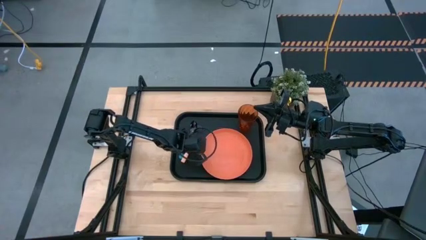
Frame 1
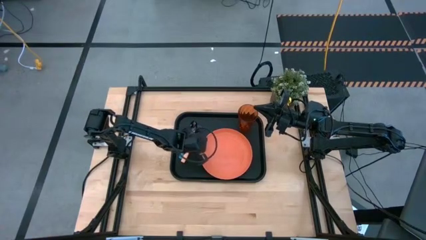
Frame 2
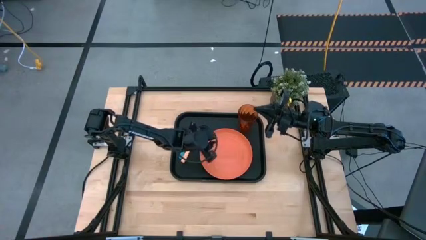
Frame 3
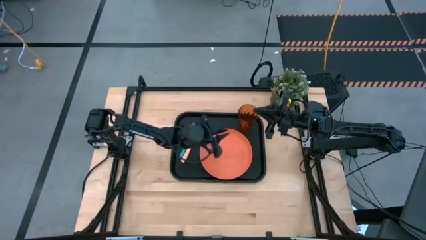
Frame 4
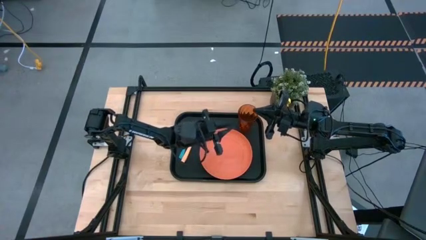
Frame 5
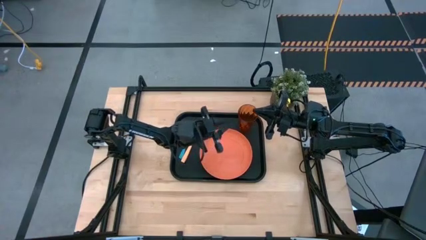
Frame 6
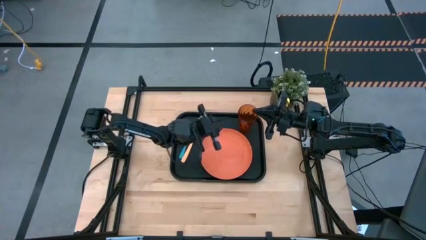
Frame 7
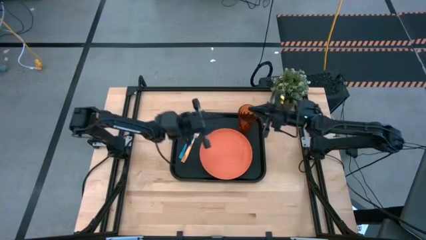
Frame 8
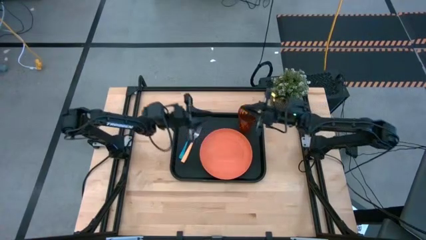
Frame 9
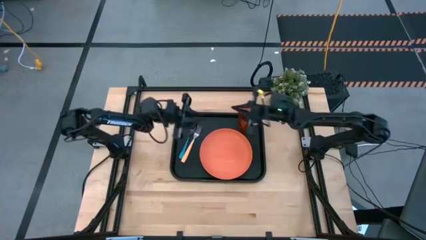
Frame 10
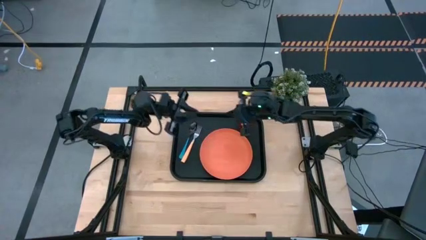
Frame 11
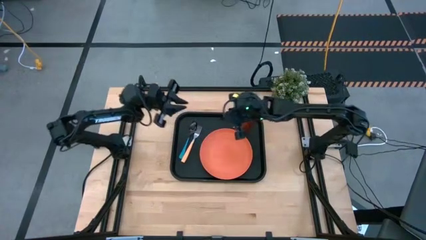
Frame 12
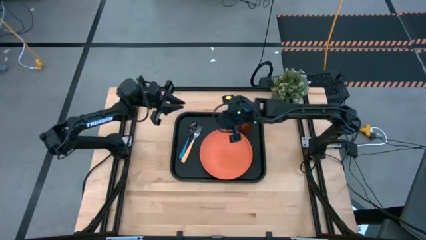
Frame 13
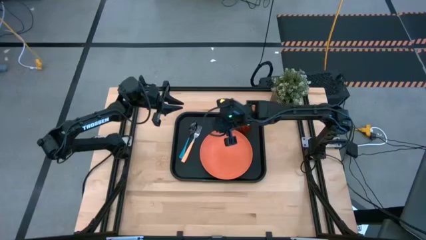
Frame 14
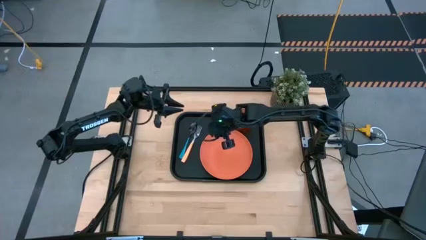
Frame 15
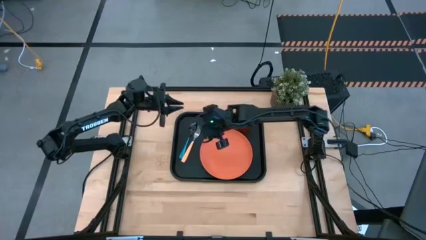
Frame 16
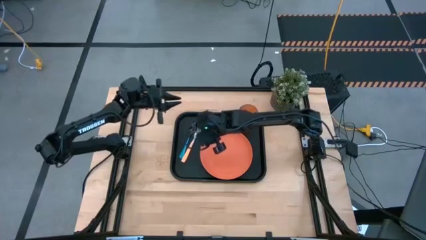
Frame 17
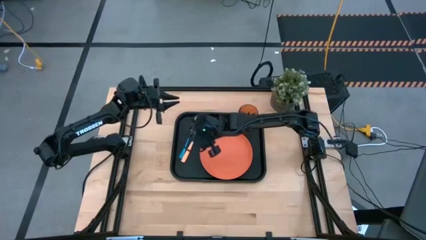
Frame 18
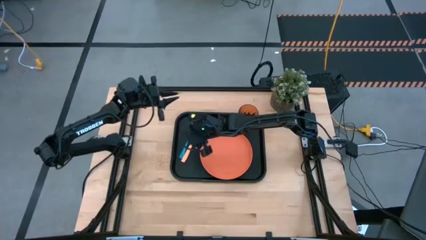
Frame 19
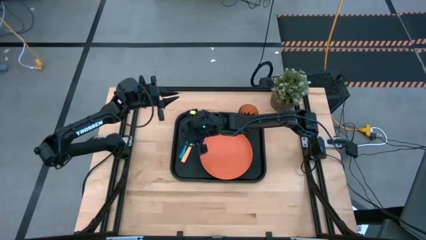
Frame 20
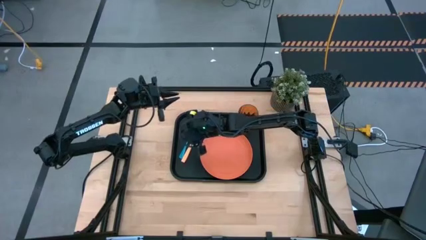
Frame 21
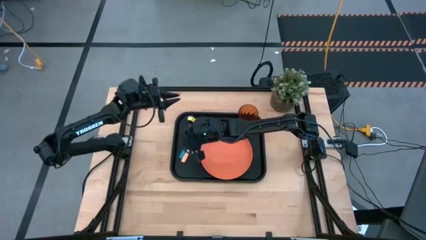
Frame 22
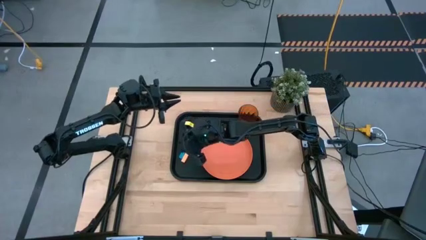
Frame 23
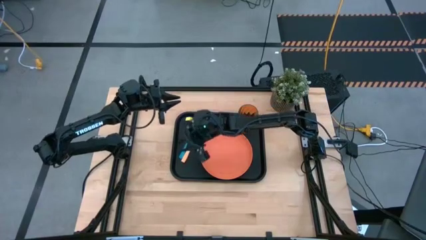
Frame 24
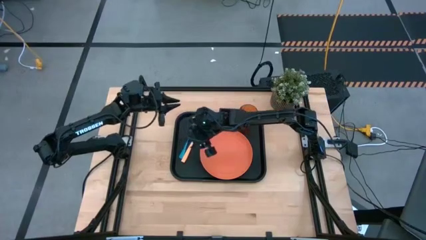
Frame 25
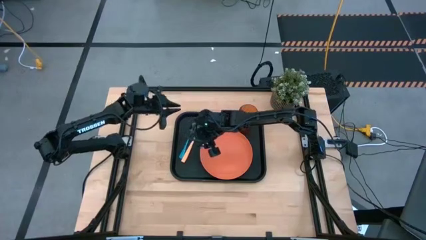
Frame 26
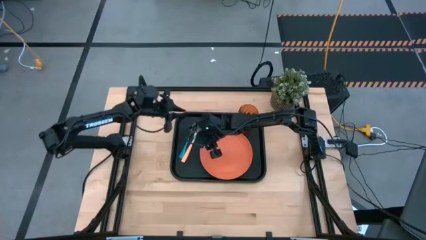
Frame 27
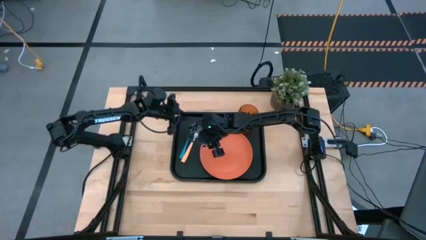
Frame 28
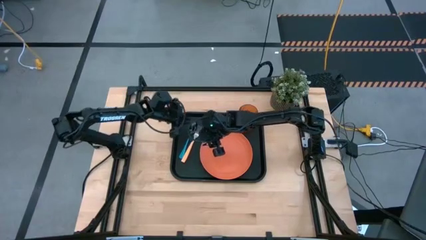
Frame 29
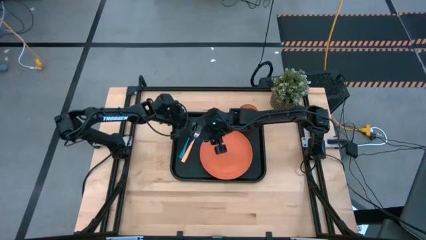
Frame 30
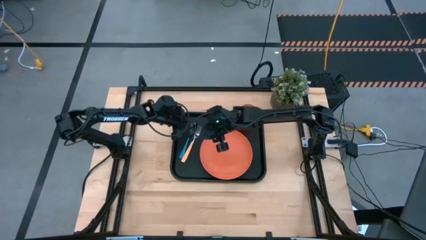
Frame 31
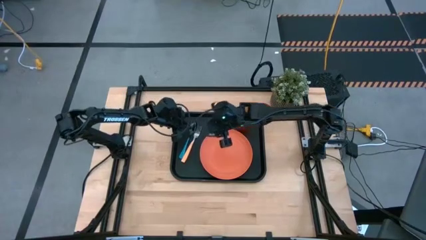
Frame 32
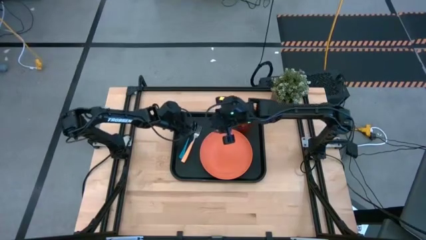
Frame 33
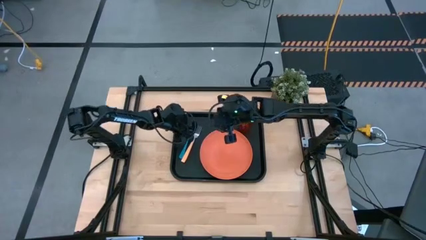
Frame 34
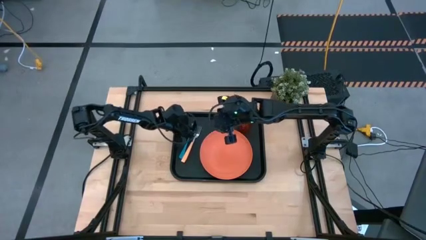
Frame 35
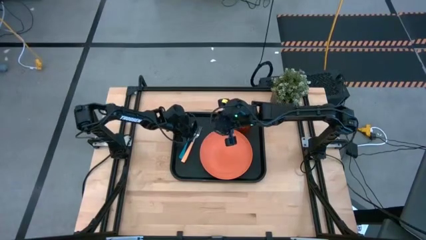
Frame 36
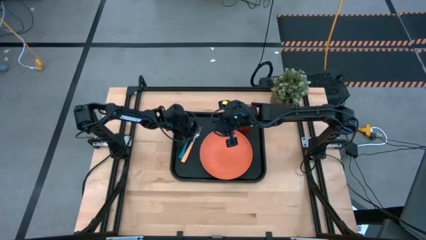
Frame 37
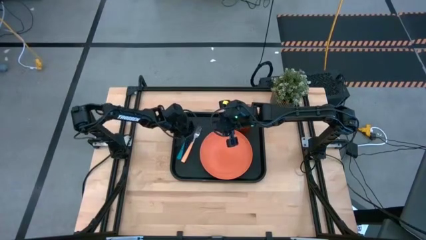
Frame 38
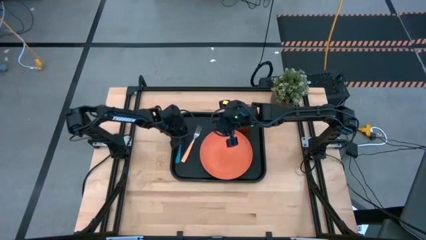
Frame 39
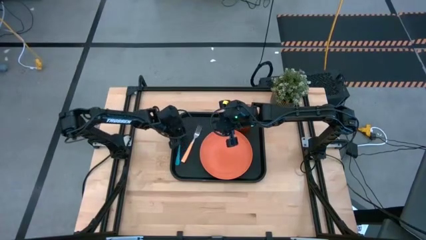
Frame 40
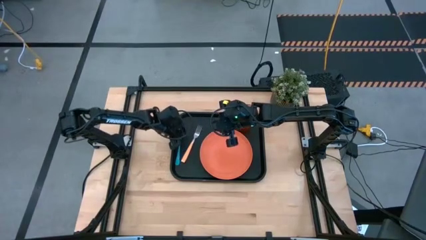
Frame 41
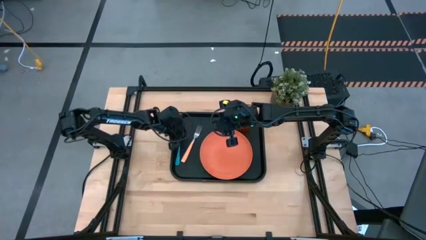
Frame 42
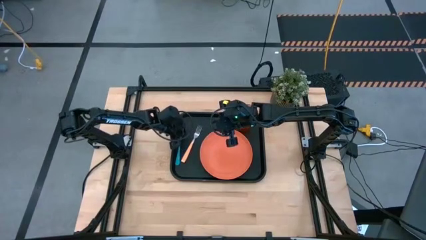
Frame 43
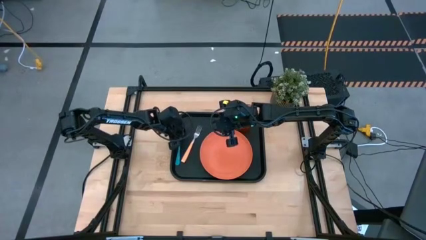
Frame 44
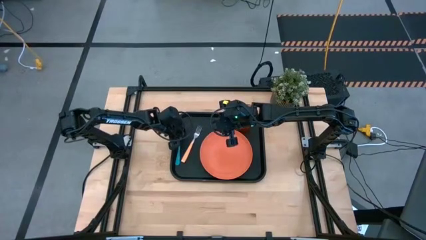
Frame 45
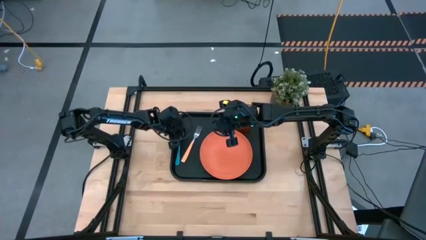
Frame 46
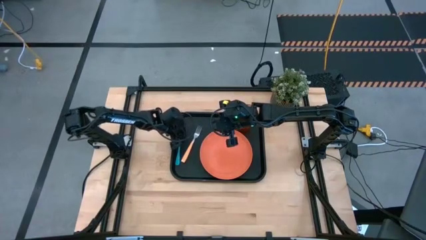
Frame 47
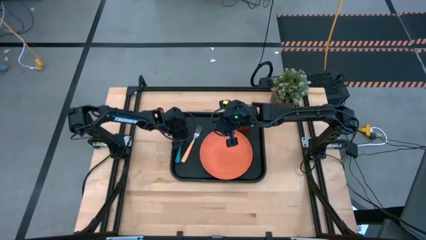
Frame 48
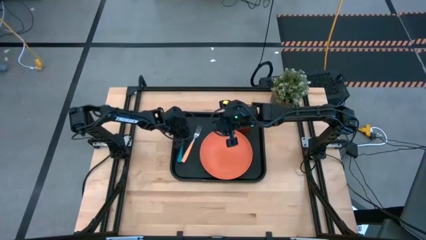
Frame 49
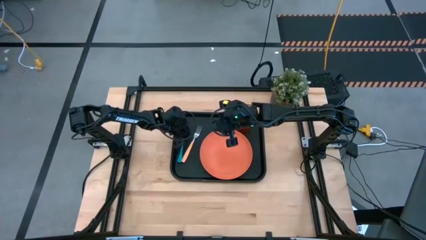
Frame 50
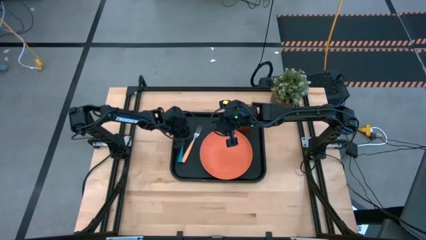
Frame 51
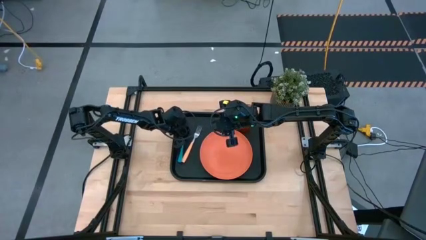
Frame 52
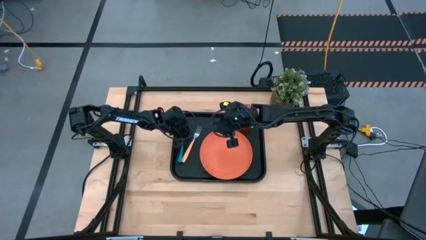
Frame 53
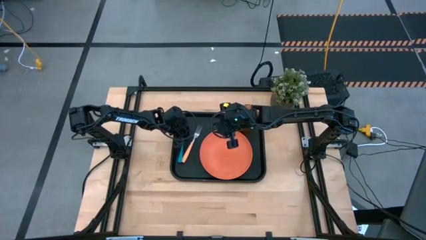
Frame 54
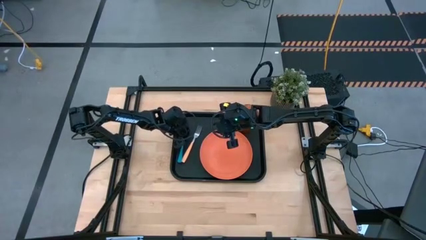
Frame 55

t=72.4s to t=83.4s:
Task: Pick and place plate/cup/fork/spoon on tray
Adjust the blue spoon on the black serving tray
